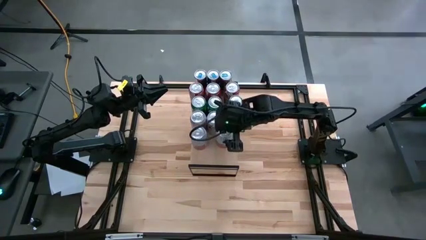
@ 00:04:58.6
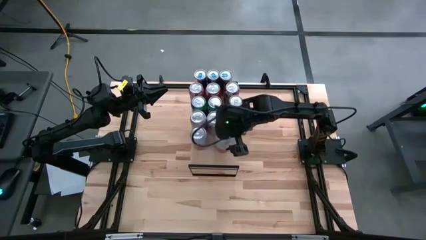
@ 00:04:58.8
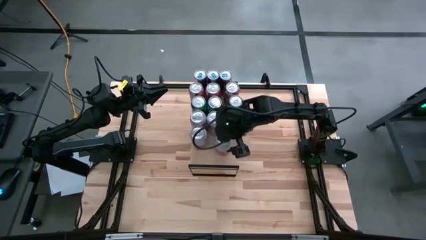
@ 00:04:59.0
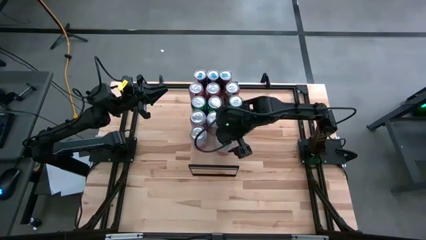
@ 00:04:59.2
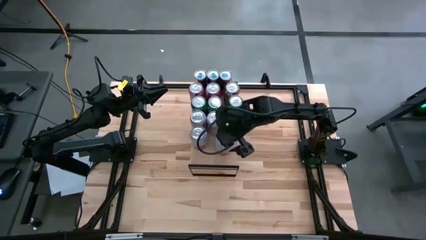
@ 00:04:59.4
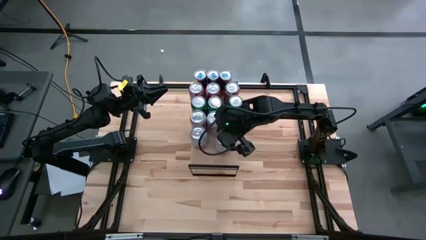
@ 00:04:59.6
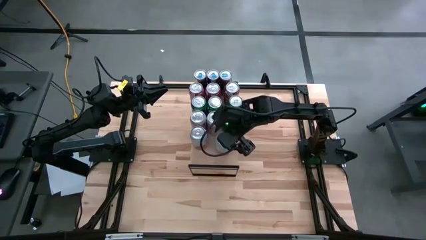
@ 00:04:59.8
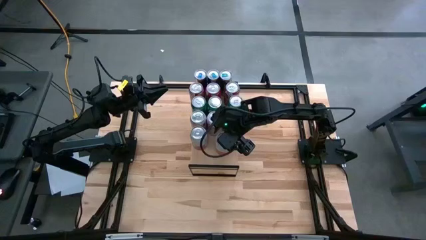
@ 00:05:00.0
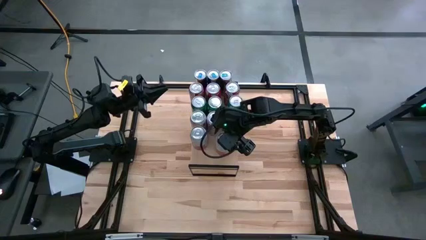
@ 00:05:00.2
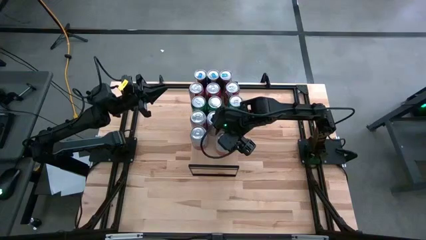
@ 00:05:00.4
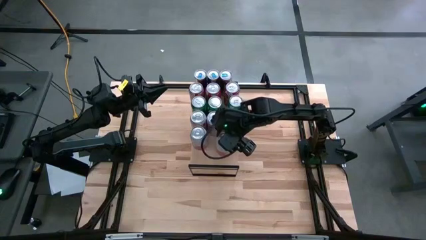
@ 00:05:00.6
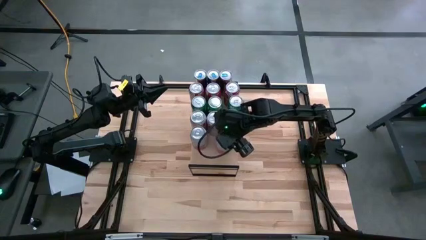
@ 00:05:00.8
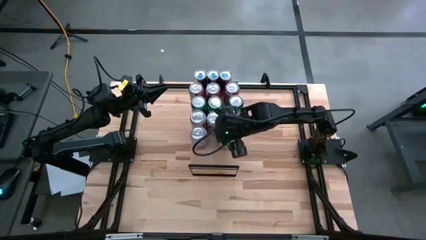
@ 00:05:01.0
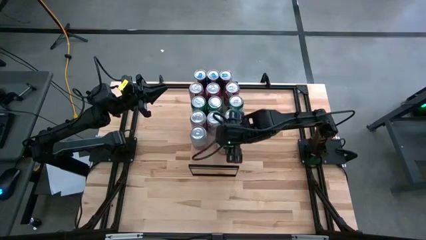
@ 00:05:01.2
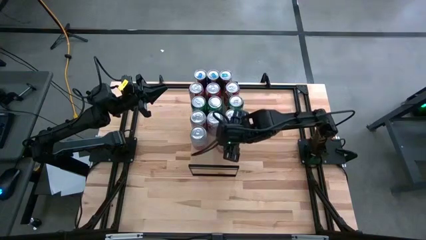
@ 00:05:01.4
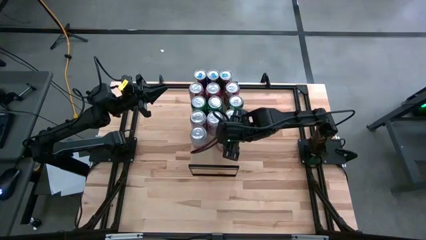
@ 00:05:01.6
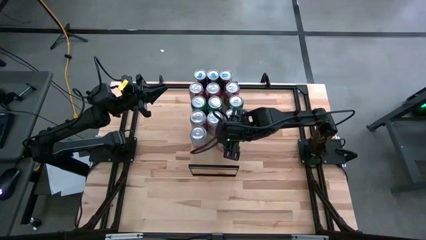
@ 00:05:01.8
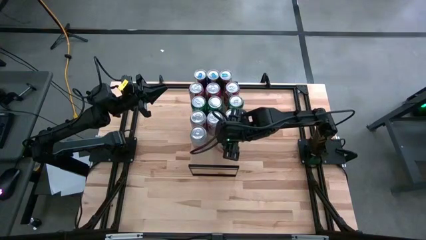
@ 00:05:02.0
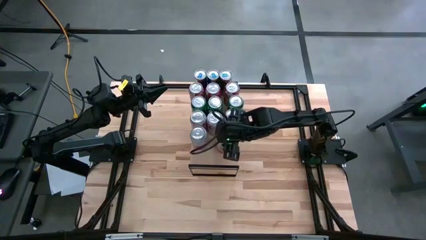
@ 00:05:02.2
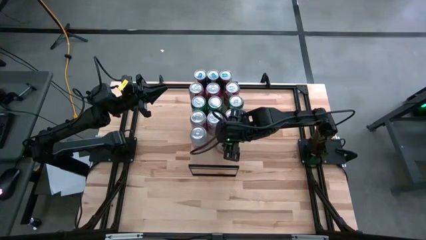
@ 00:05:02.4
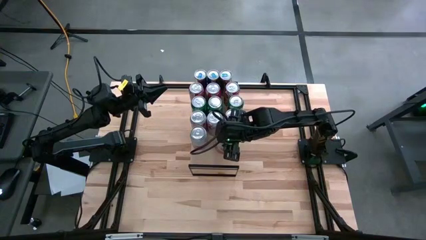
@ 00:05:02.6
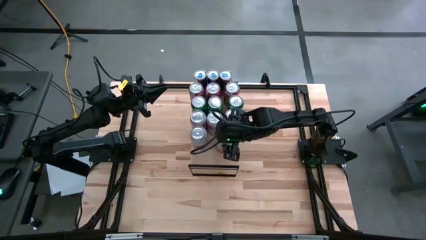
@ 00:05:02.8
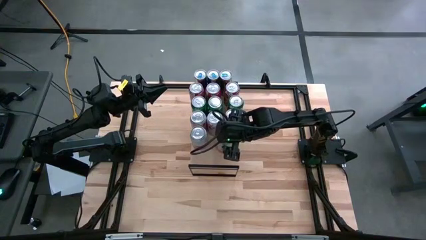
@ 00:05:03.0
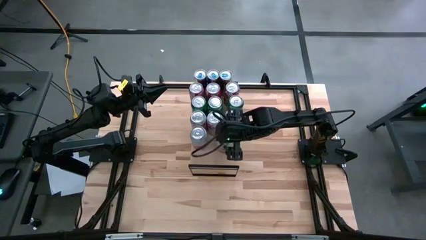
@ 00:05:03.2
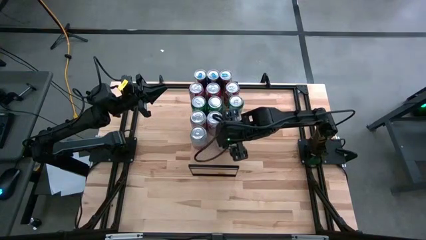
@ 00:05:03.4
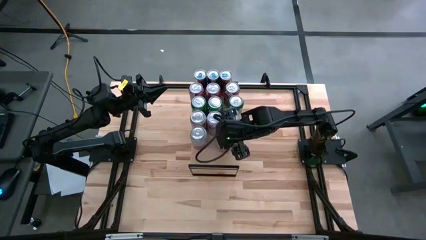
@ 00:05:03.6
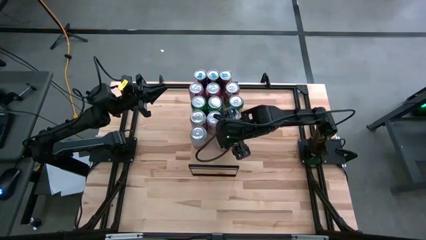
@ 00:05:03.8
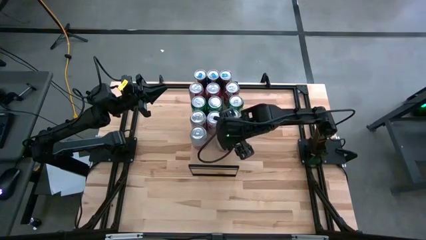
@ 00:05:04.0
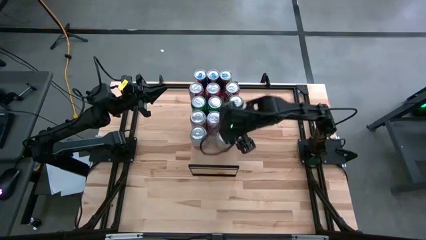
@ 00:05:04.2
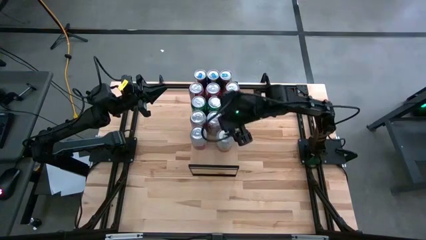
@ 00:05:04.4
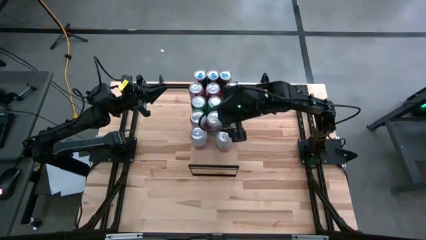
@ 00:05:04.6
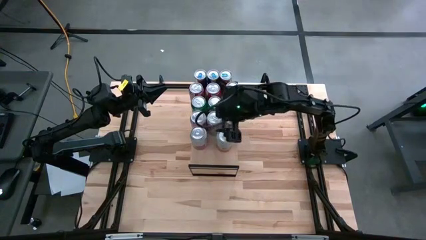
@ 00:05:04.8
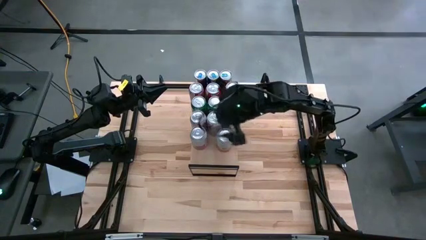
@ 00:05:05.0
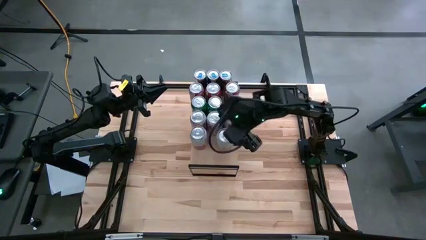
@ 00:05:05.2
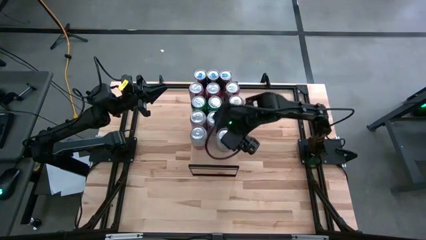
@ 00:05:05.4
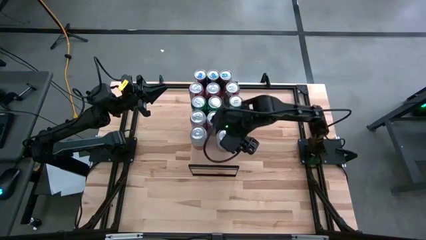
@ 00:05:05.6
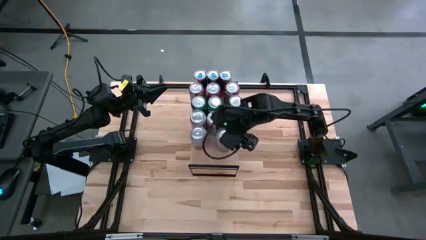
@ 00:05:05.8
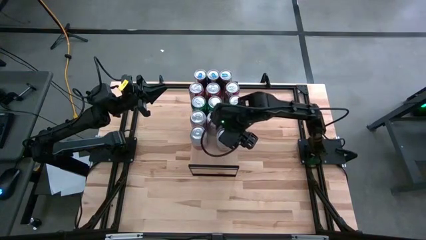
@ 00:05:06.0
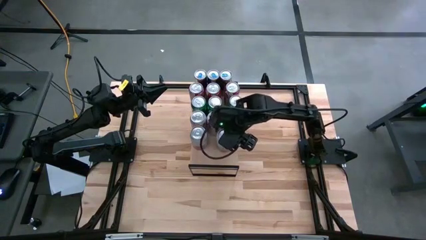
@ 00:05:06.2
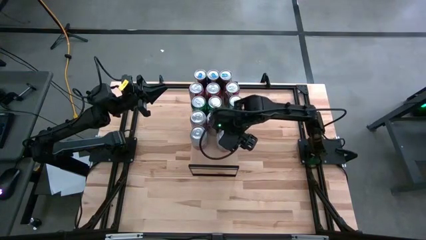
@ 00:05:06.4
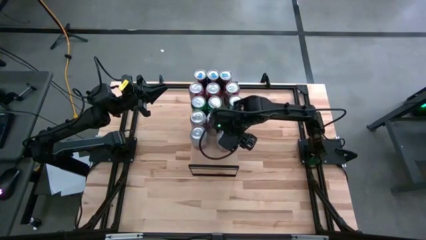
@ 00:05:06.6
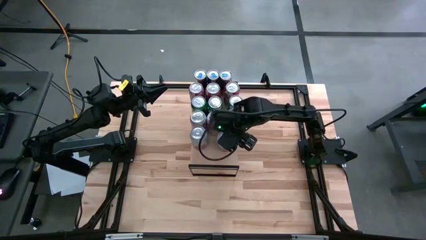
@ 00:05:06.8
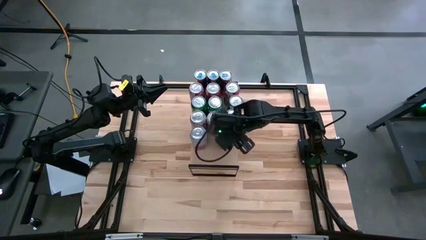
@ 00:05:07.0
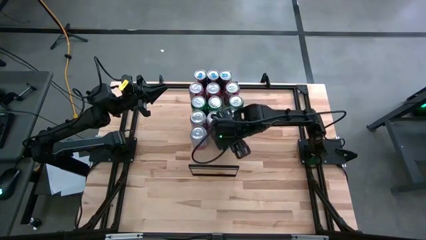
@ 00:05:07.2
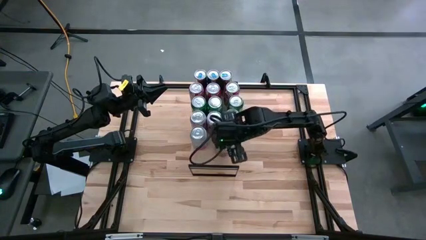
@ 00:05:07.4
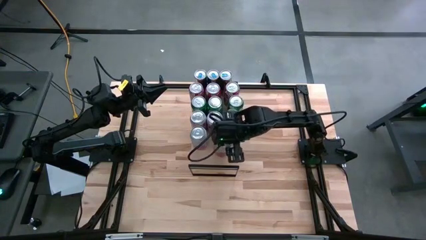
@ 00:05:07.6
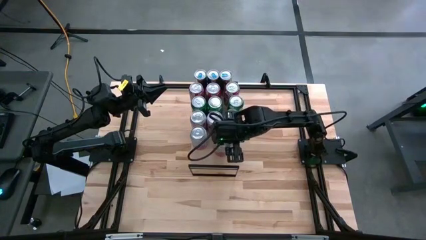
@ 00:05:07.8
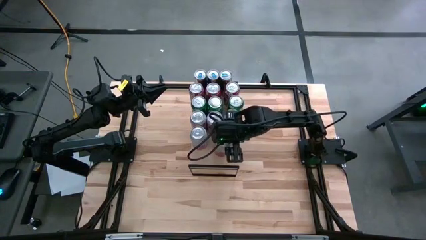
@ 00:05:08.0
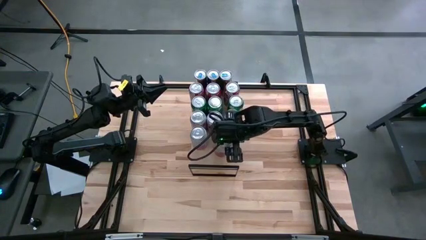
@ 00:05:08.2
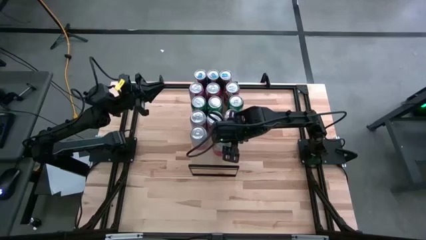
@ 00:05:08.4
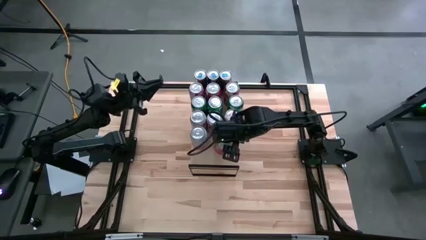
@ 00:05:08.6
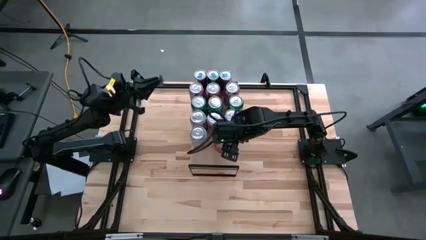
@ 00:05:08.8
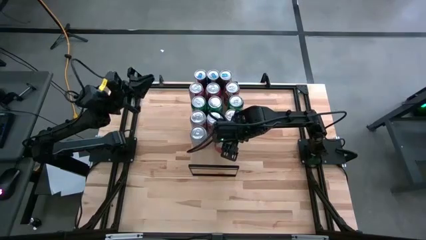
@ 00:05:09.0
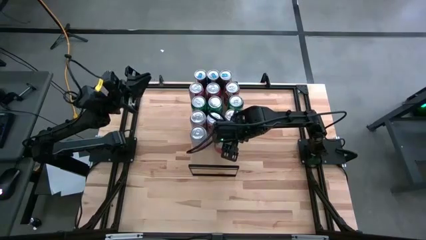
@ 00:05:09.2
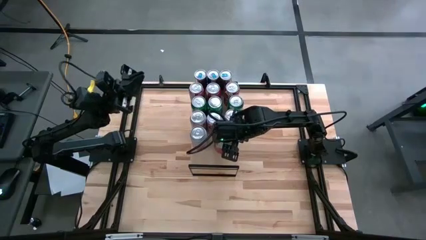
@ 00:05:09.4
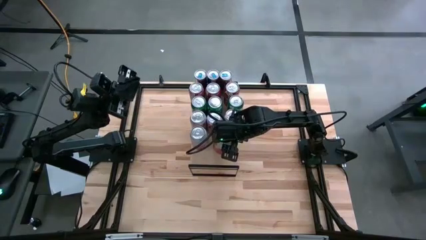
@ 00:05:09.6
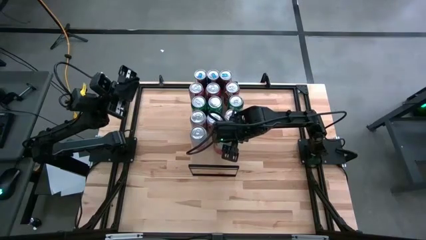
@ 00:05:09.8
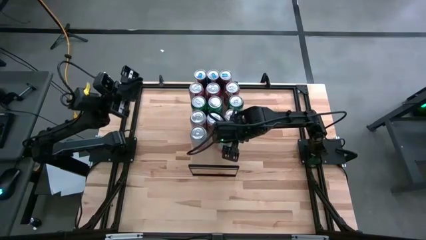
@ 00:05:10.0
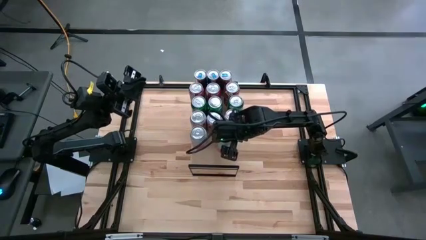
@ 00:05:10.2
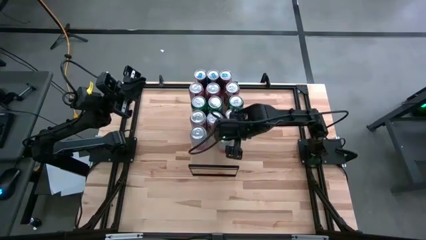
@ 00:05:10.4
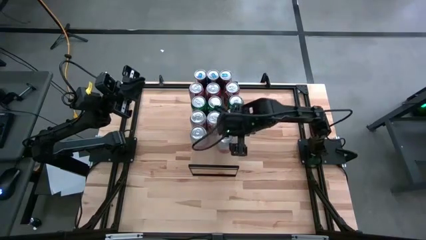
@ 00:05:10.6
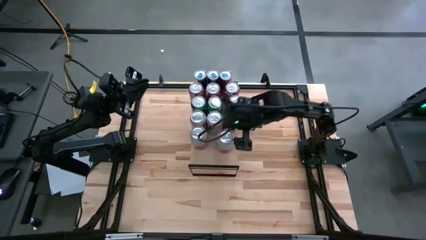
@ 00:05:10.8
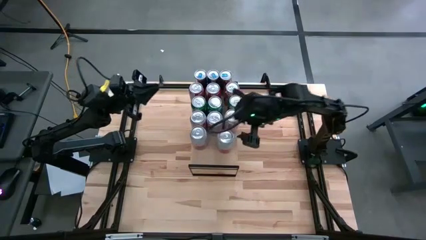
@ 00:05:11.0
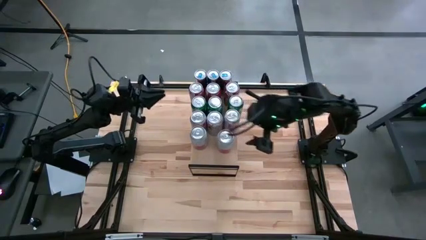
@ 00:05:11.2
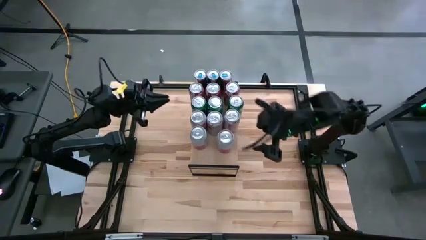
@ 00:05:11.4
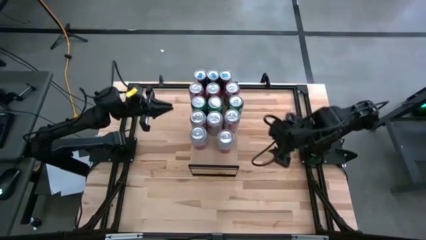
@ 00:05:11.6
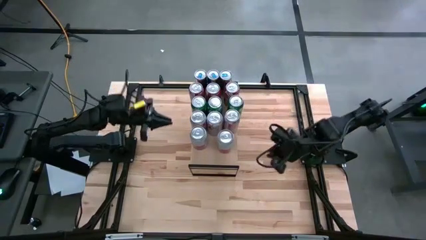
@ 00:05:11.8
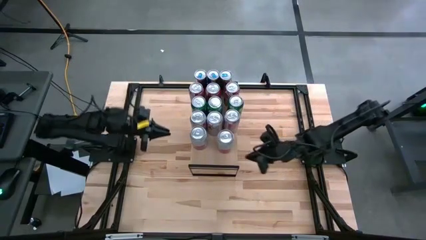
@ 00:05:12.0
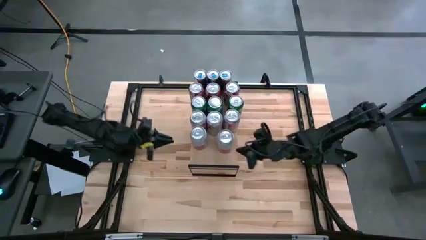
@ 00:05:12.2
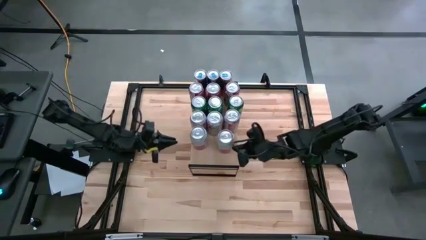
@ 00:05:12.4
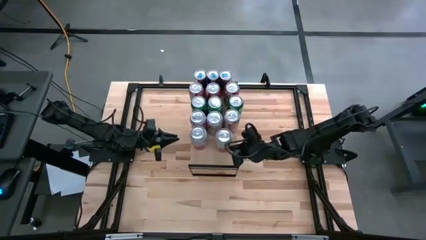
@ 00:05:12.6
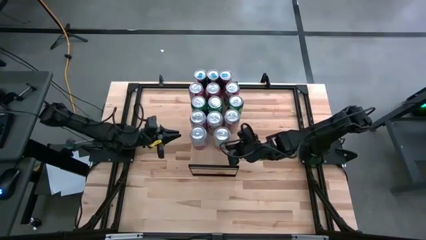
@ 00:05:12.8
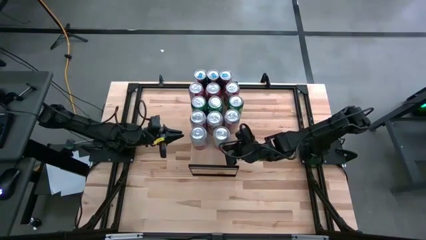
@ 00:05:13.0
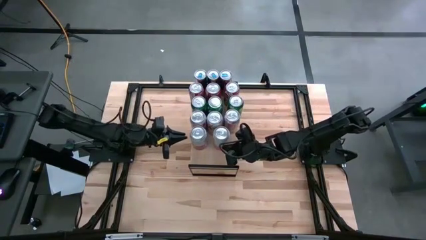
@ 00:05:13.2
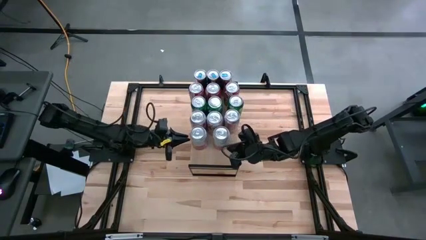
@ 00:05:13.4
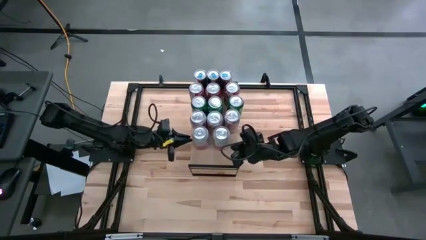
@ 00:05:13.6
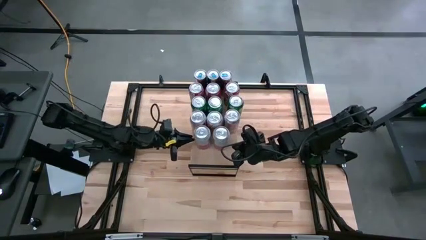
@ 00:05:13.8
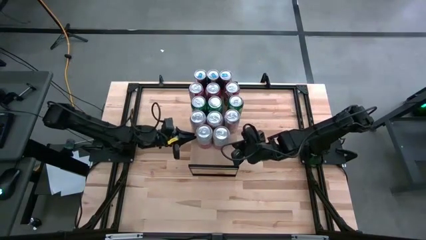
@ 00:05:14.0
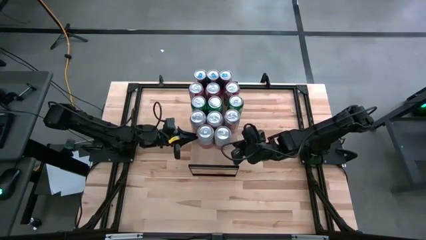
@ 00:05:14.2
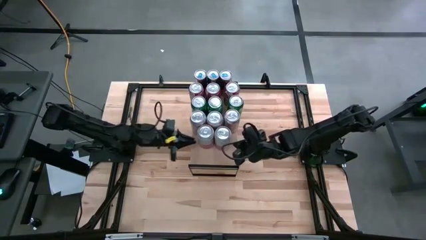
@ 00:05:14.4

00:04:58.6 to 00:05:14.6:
Task: Place canned beverage on shelf
Put the pink white soda can on the shelf
